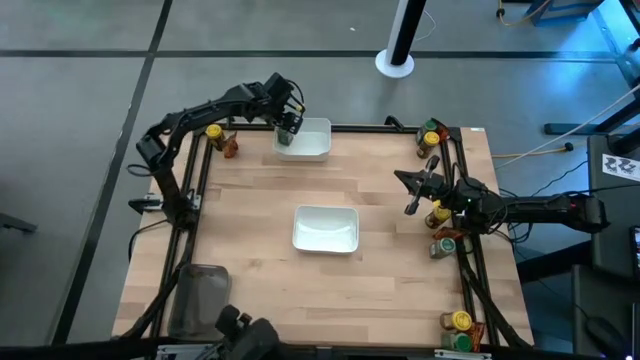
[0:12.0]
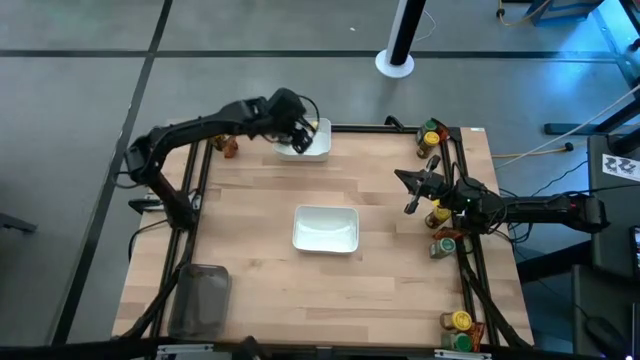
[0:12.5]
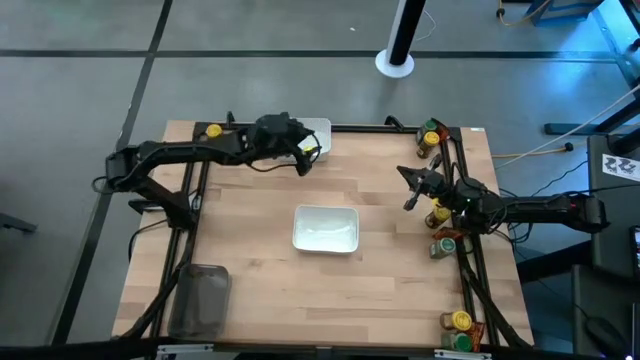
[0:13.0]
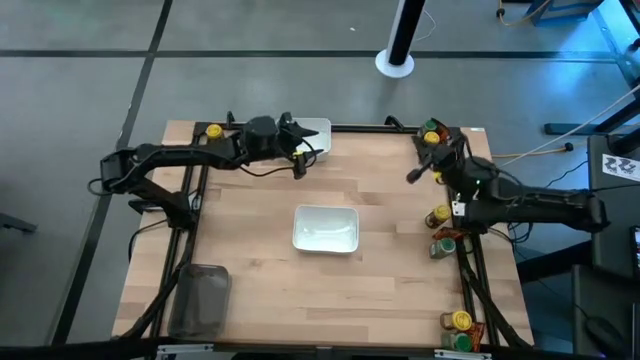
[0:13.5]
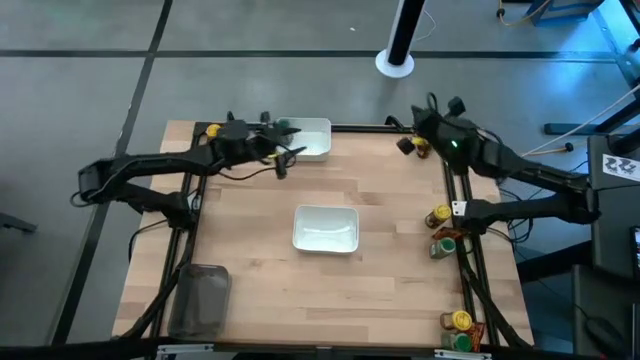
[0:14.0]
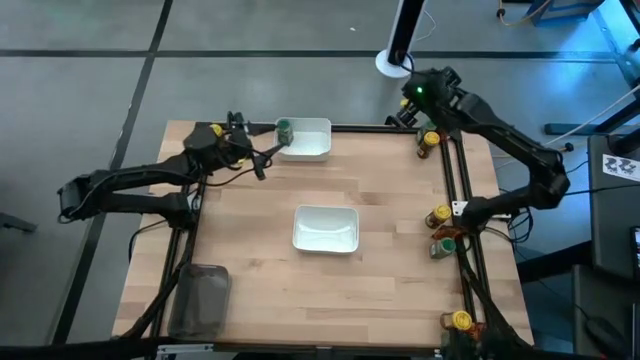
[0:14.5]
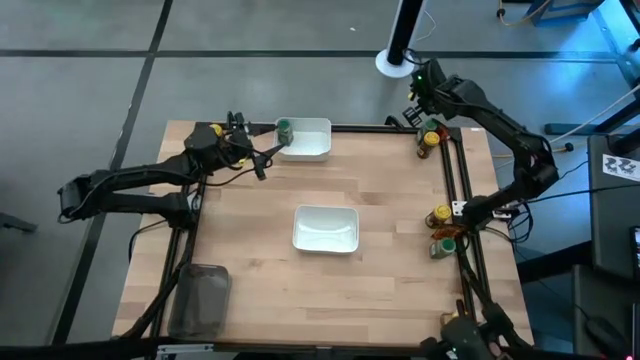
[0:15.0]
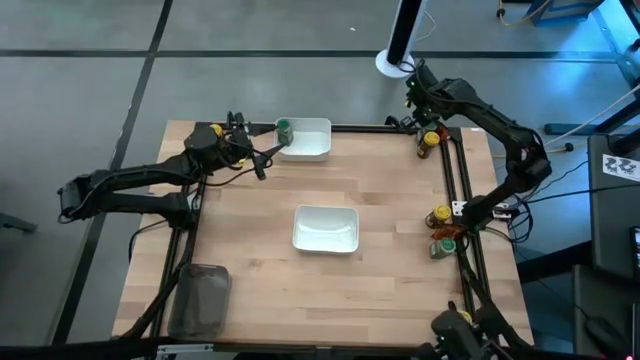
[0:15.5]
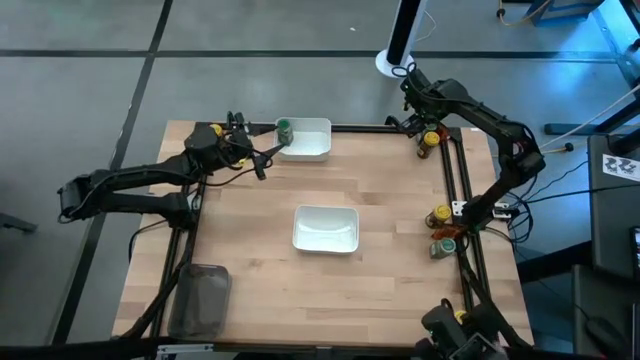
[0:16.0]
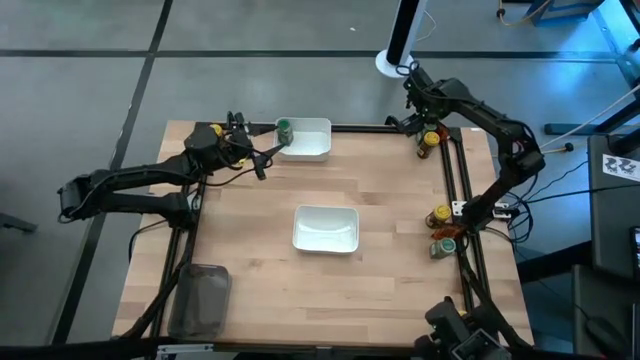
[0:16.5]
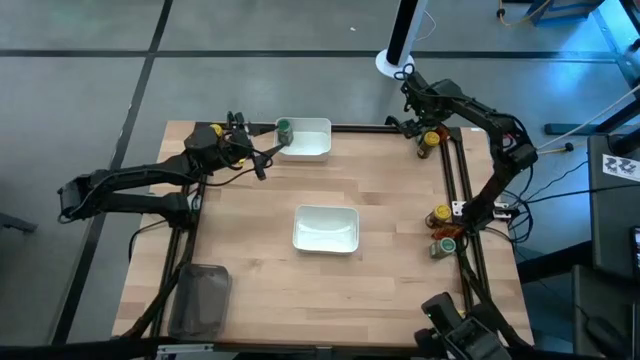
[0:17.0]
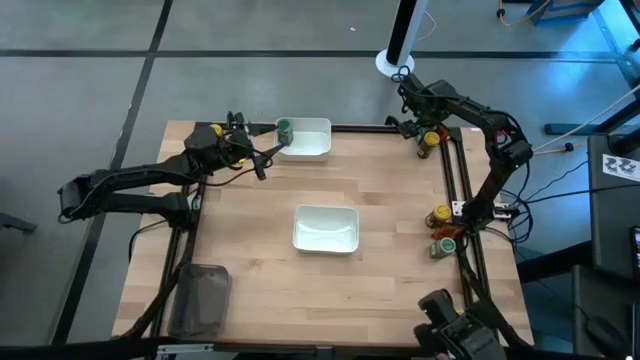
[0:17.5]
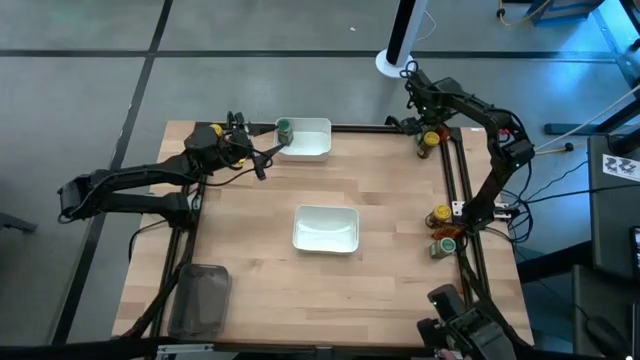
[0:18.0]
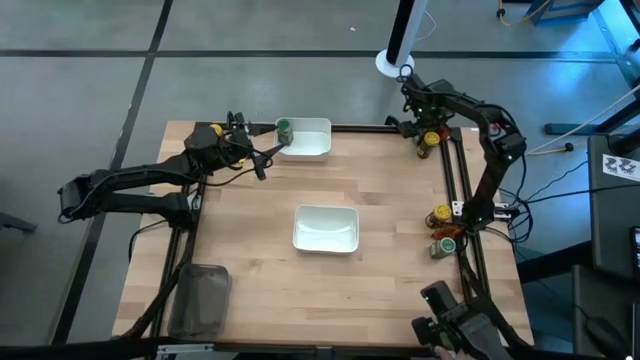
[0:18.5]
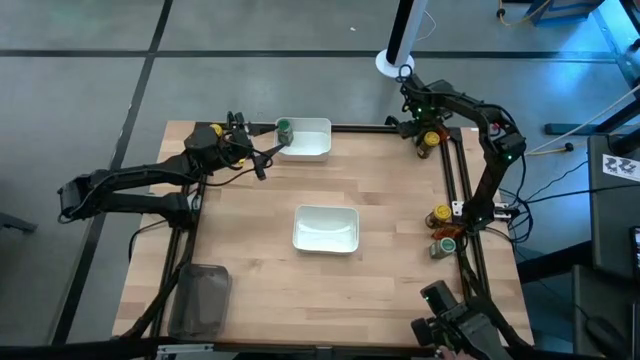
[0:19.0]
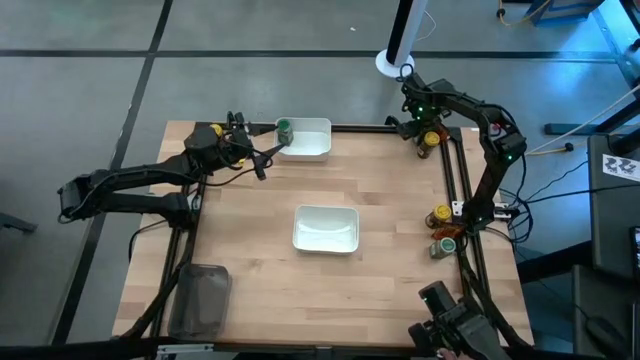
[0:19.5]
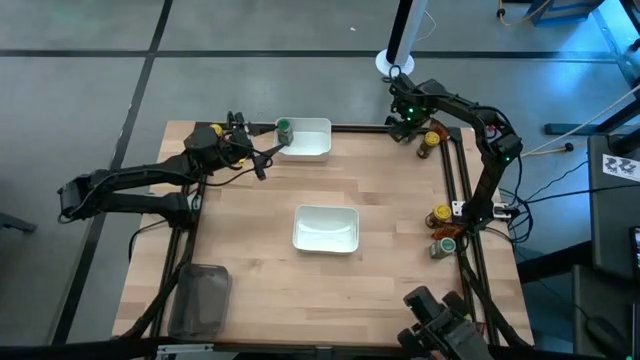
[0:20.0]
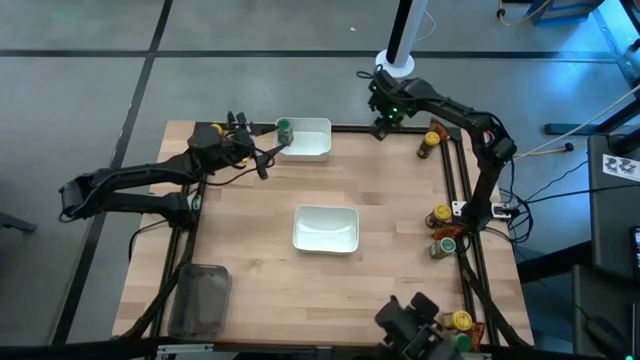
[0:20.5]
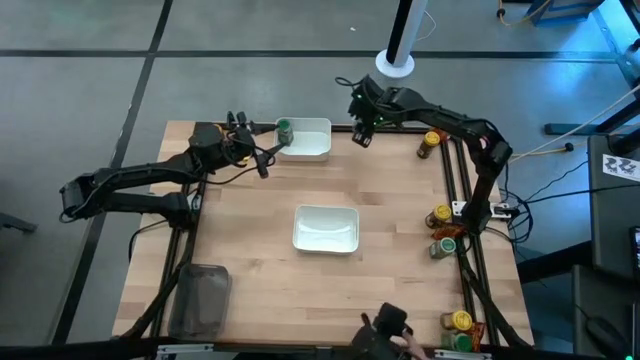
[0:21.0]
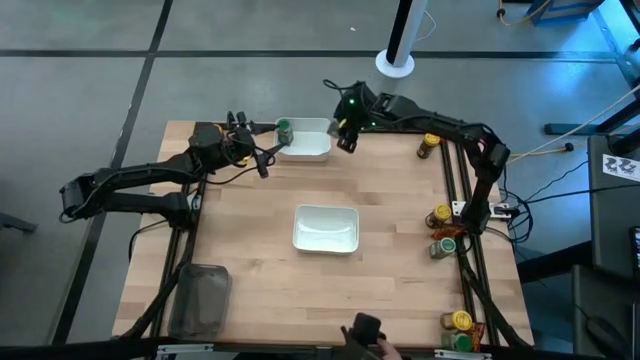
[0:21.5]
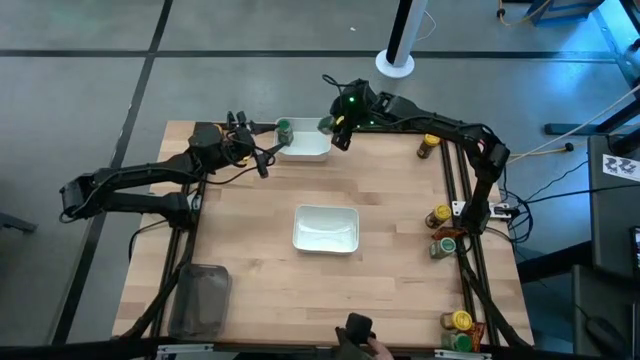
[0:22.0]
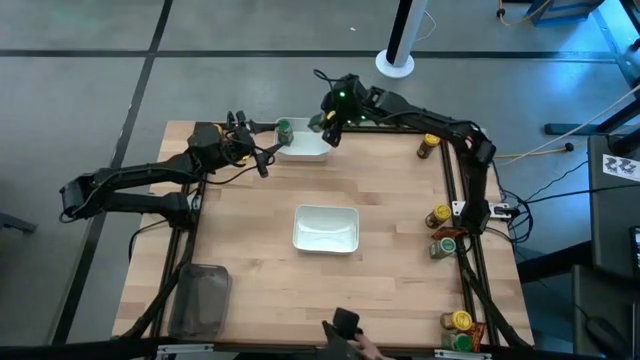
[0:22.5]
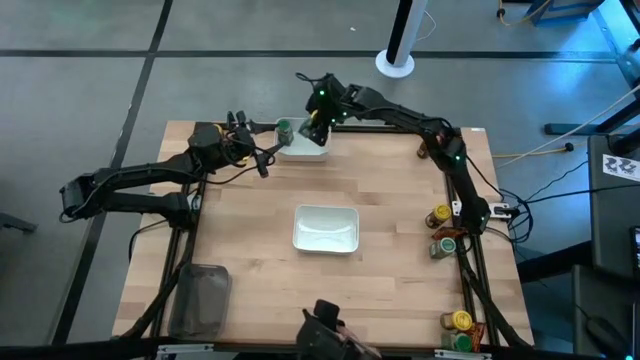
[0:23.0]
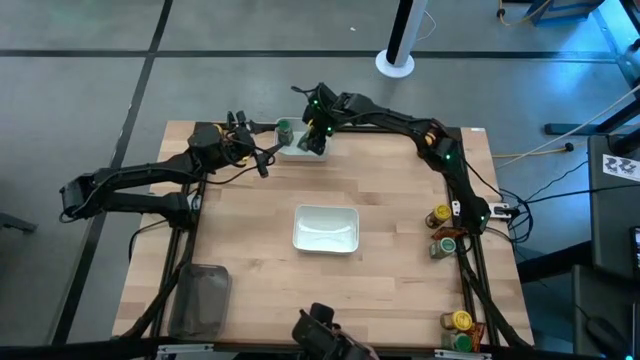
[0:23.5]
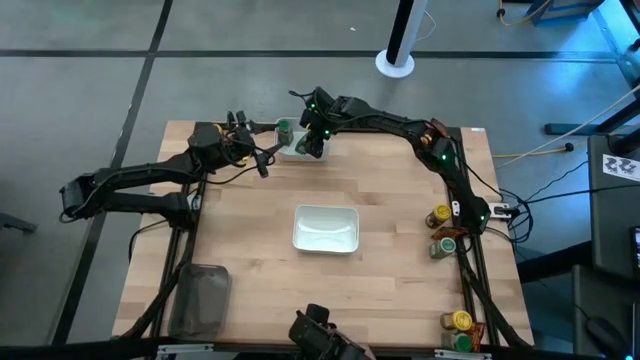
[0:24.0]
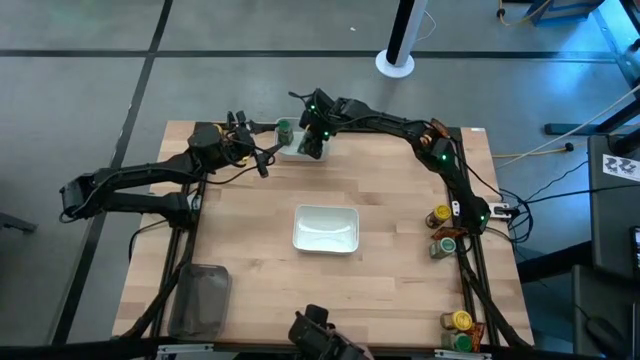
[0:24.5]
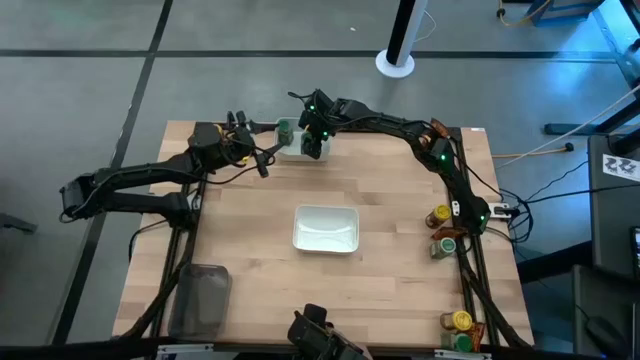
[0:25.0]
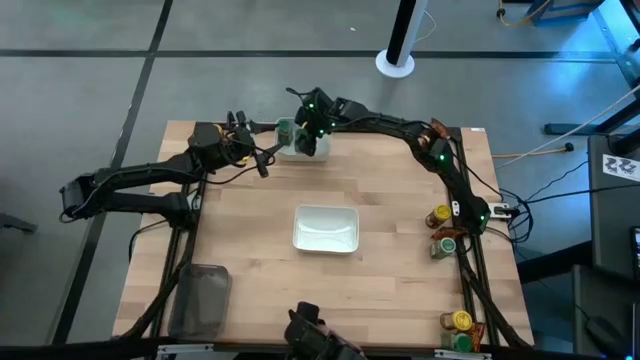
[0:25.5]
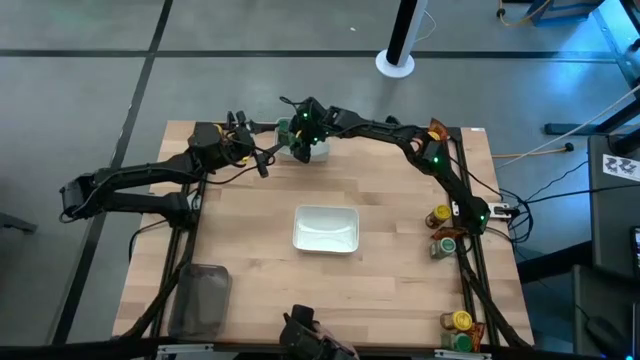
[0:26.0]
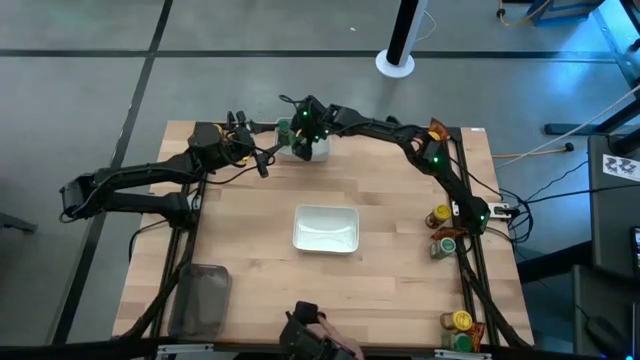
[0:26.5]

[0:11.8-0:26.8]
Task: Sort spices by type
Put the top right green seasoning bottle into the top white bin

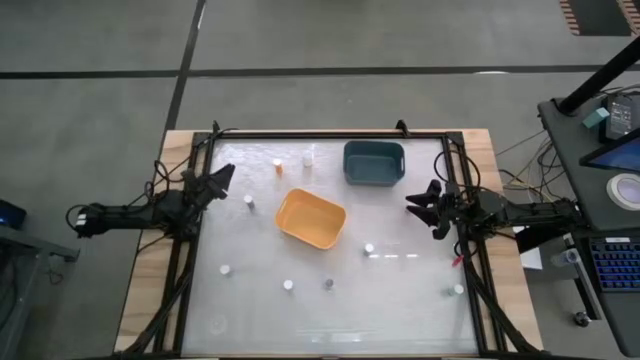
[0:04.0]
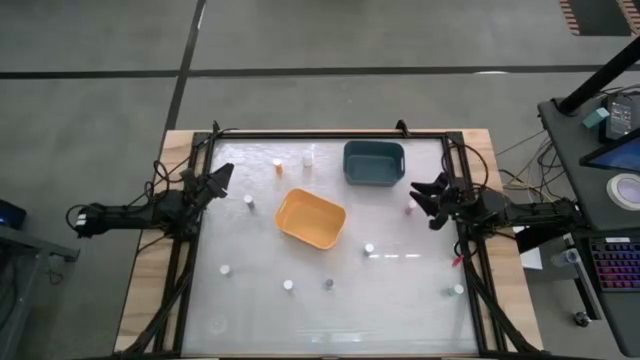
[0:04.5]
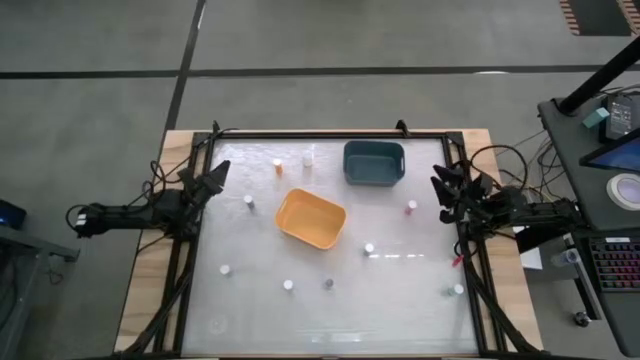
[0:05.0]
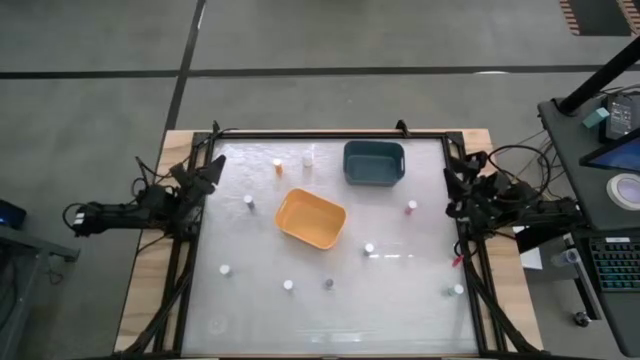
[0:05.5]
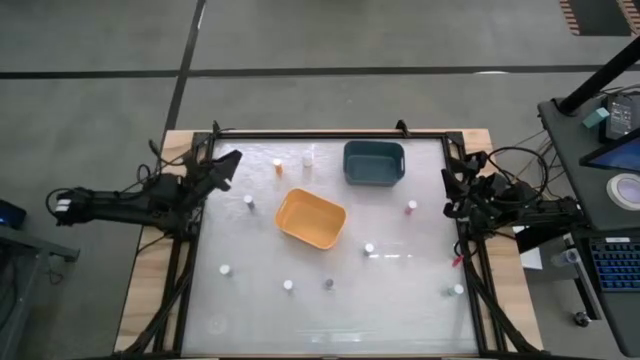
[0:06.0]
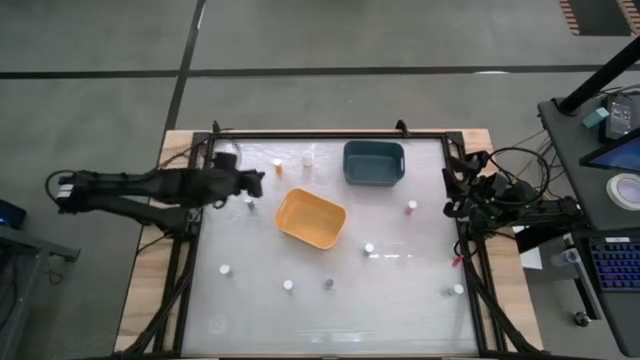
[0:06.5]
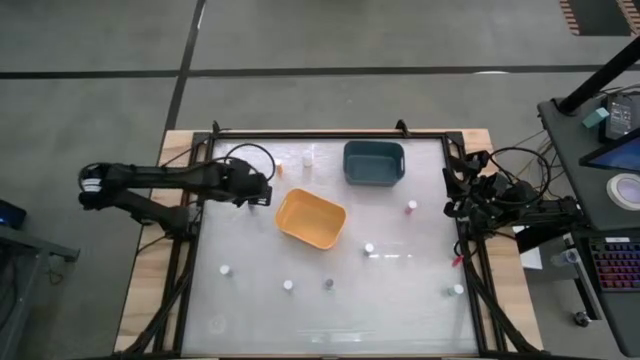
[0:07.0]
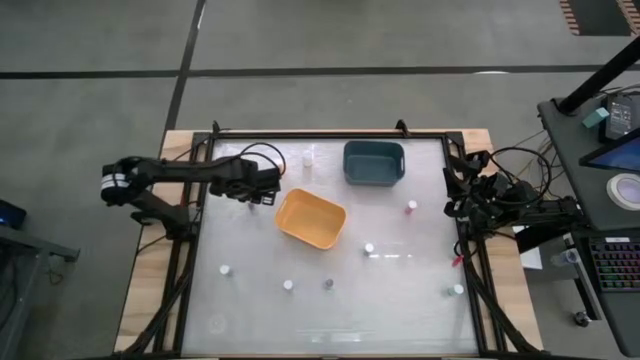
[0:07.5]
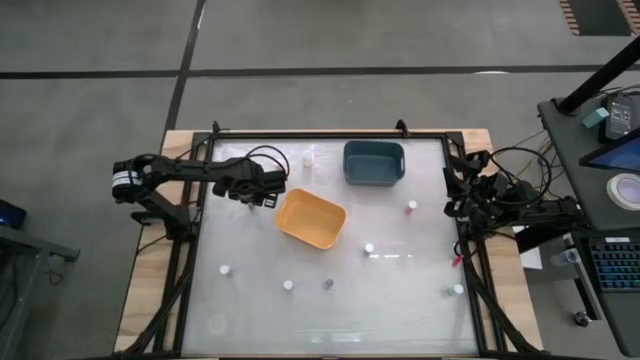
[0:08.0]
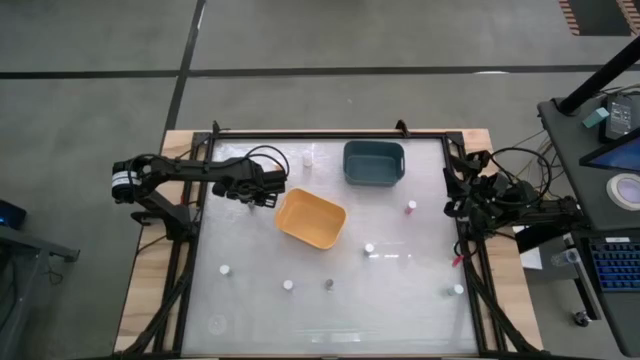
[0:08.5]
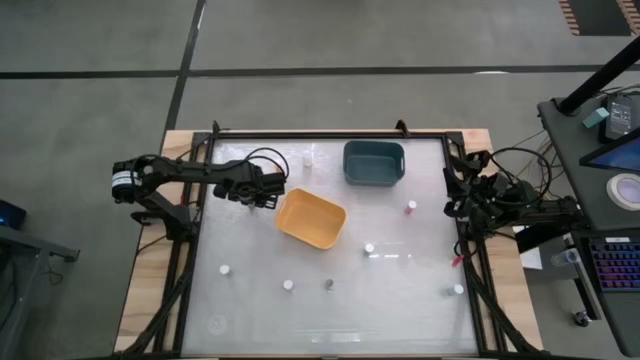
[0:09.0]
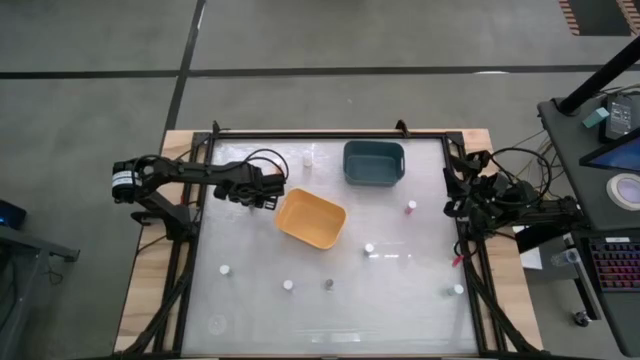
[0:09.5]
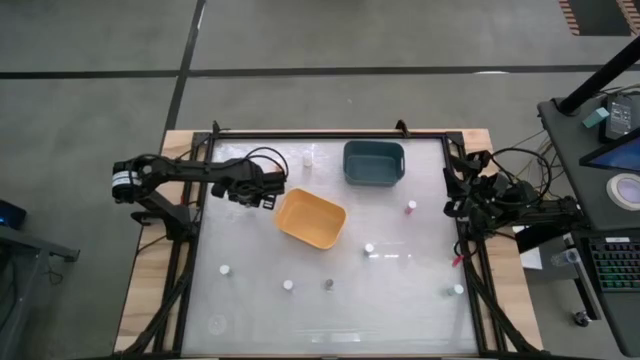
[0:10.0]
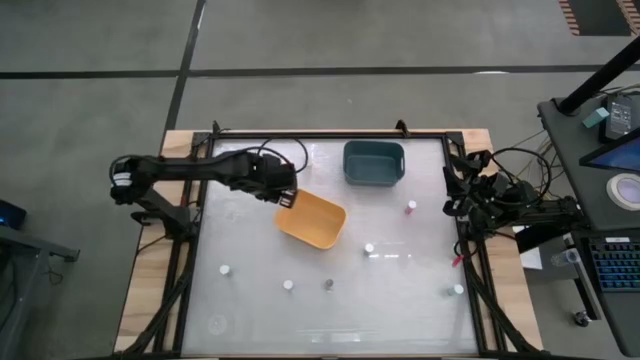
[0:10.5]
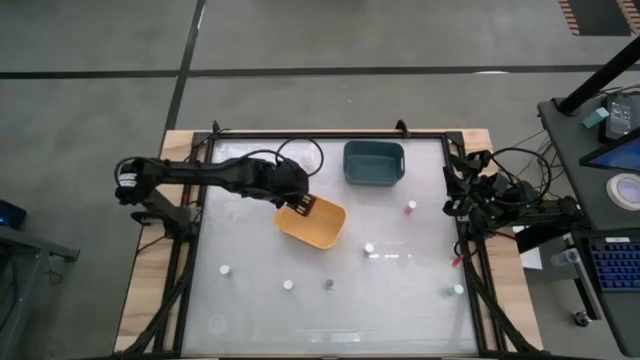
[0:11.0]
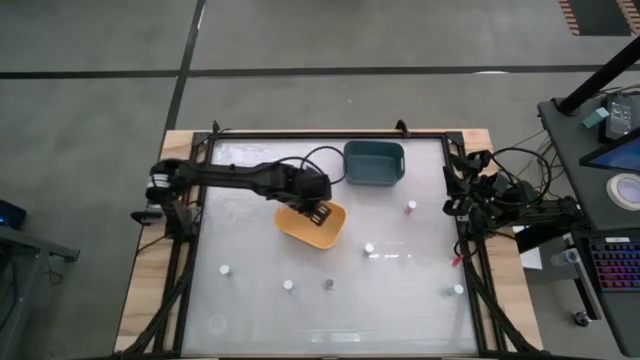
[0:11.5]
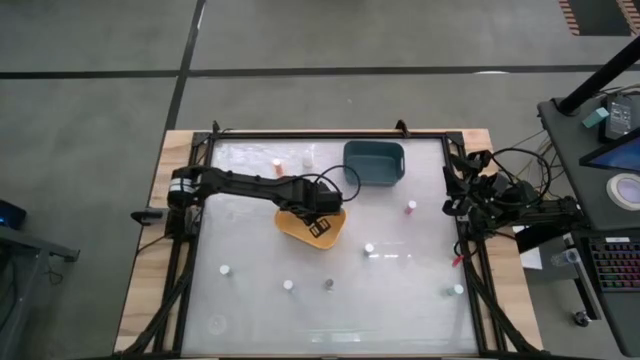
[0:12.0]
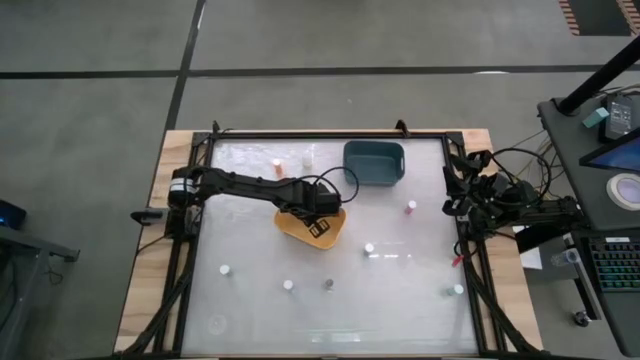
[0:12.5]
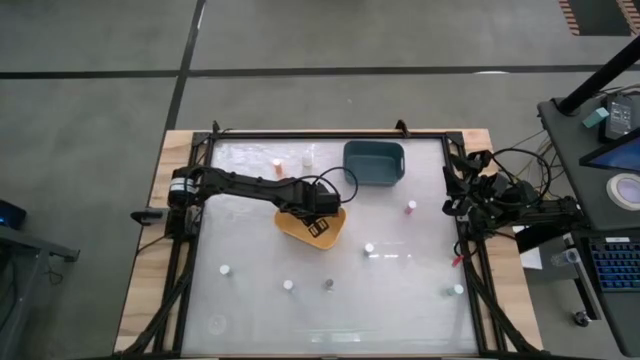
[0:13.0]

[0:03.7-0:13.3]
Task: Pick and place medicine bottles into bin by pill shape (circle, oval)
Put the blue pill bottle into the yellow bin
